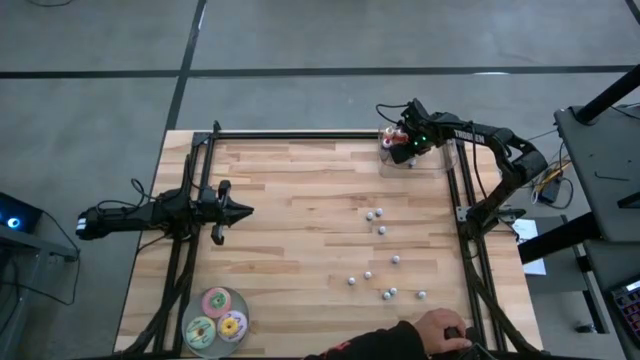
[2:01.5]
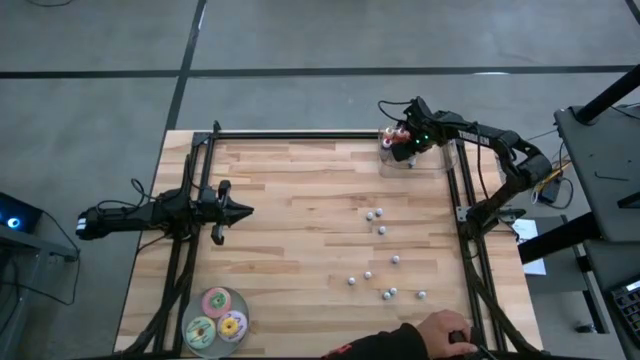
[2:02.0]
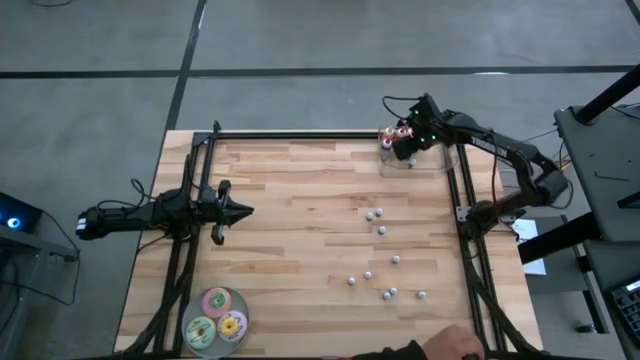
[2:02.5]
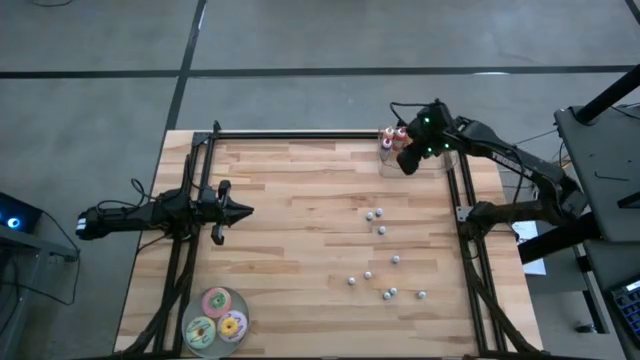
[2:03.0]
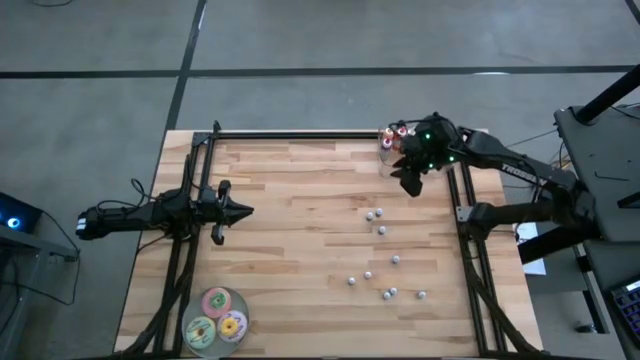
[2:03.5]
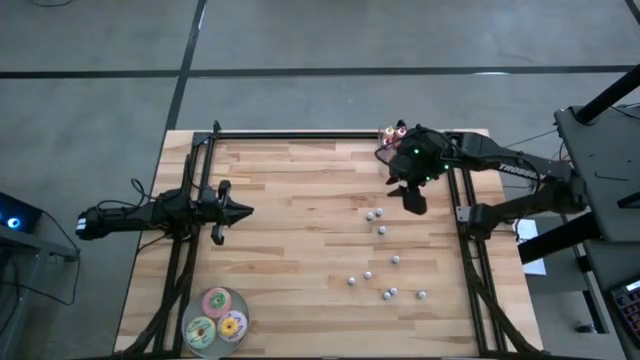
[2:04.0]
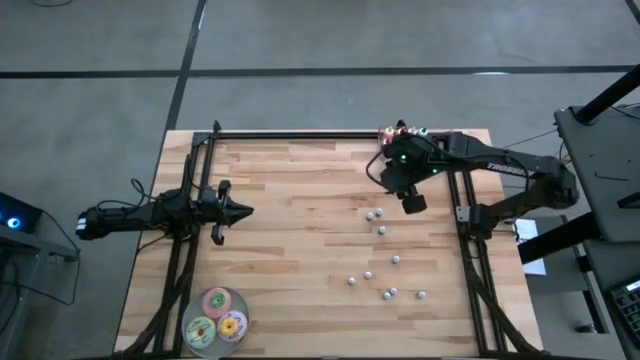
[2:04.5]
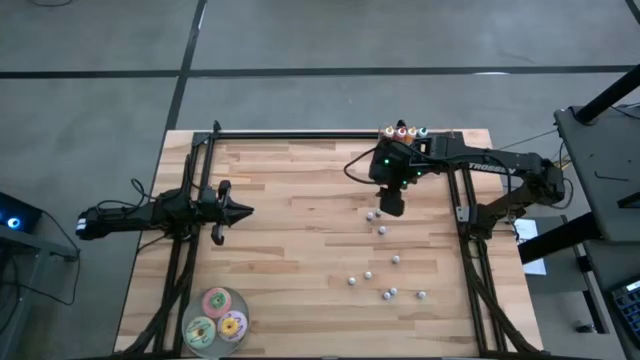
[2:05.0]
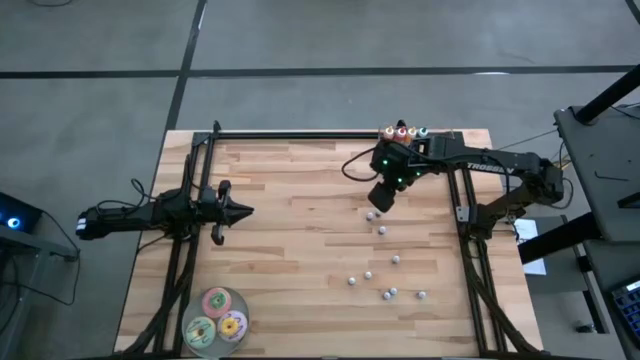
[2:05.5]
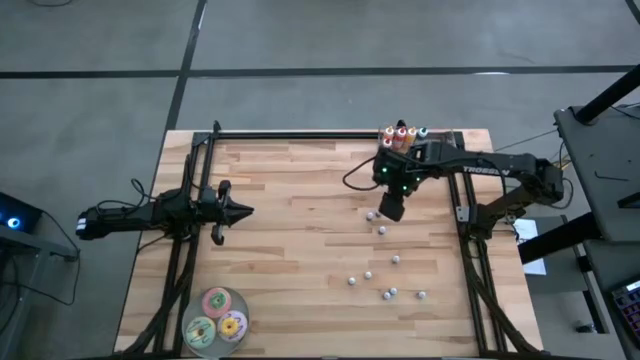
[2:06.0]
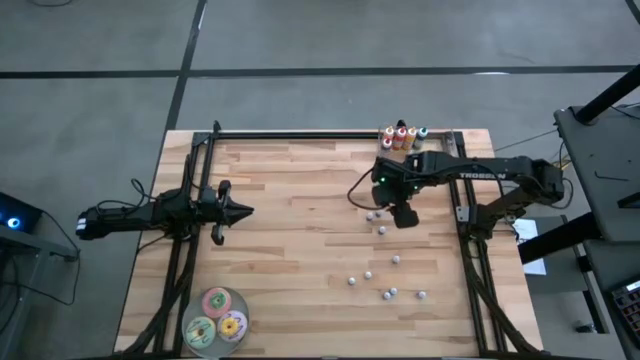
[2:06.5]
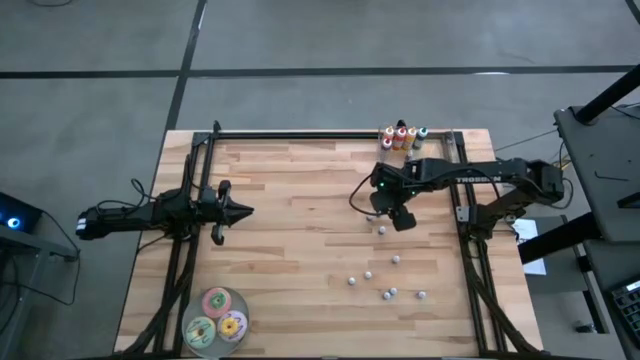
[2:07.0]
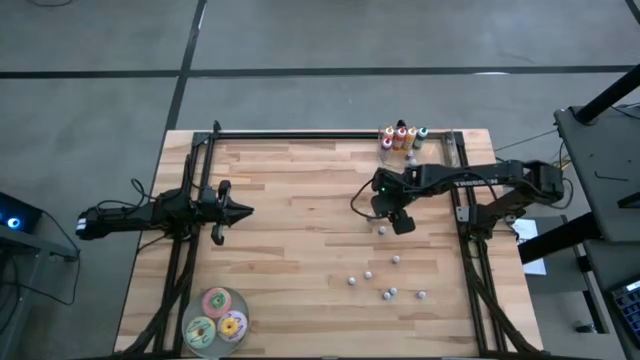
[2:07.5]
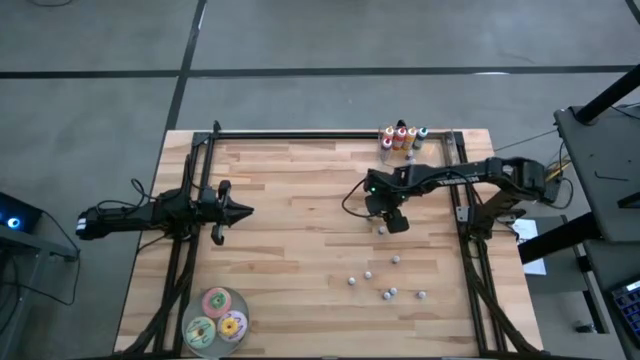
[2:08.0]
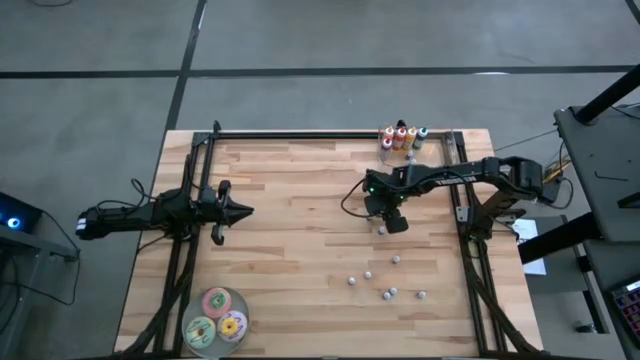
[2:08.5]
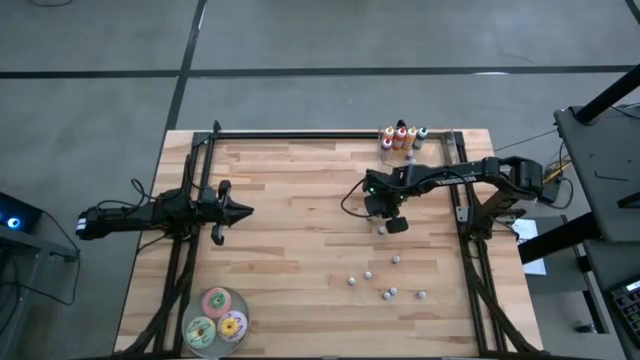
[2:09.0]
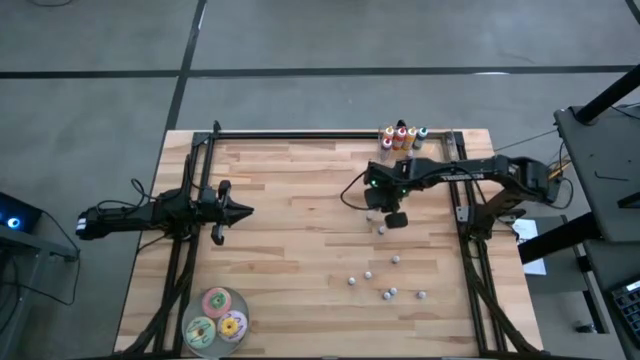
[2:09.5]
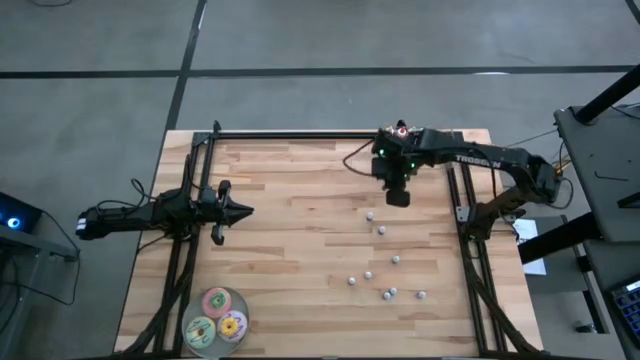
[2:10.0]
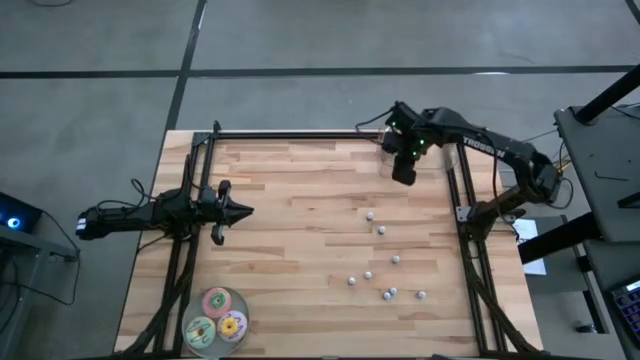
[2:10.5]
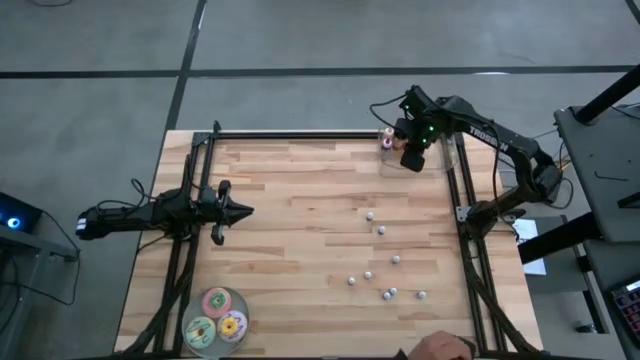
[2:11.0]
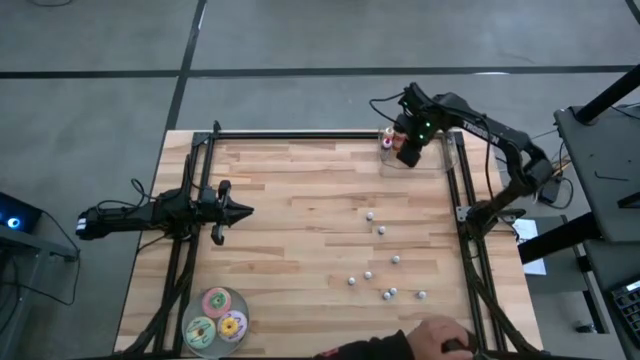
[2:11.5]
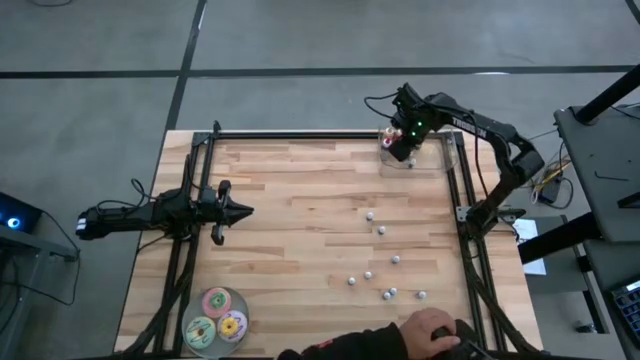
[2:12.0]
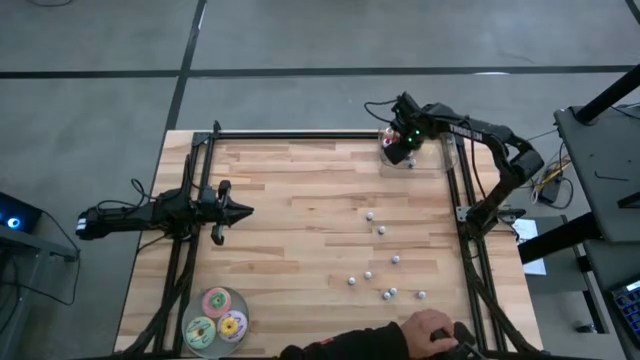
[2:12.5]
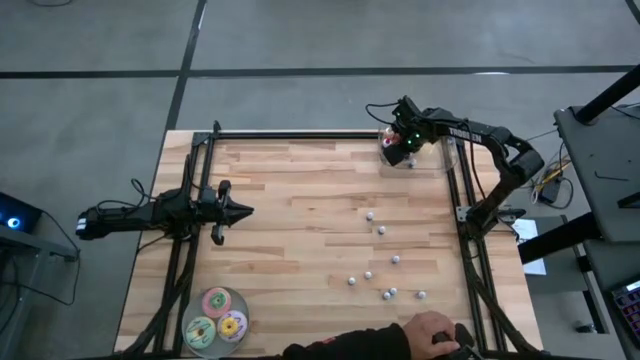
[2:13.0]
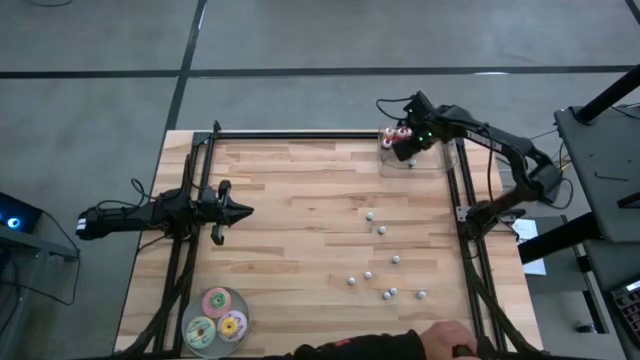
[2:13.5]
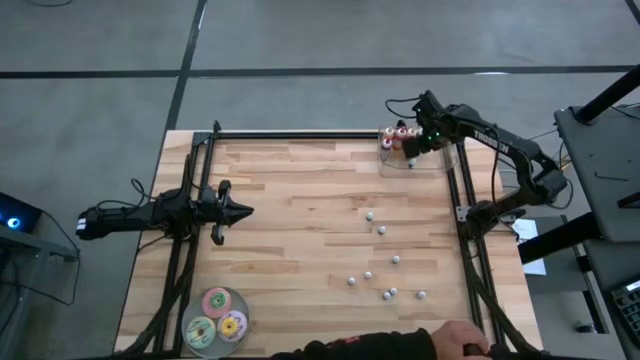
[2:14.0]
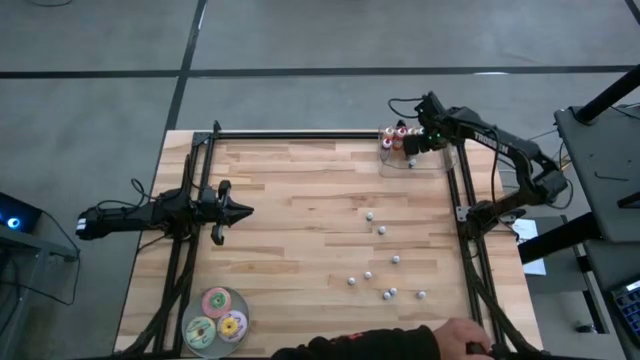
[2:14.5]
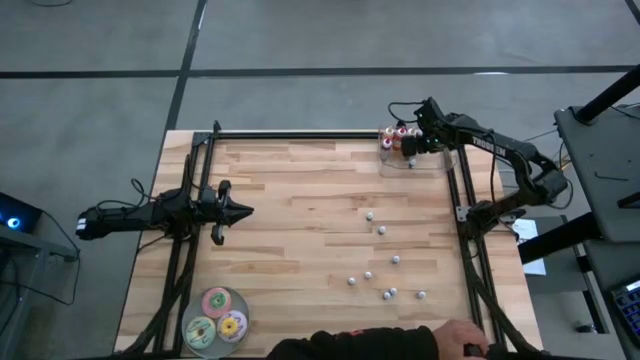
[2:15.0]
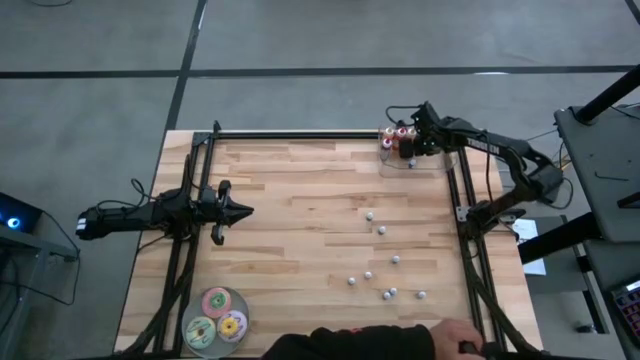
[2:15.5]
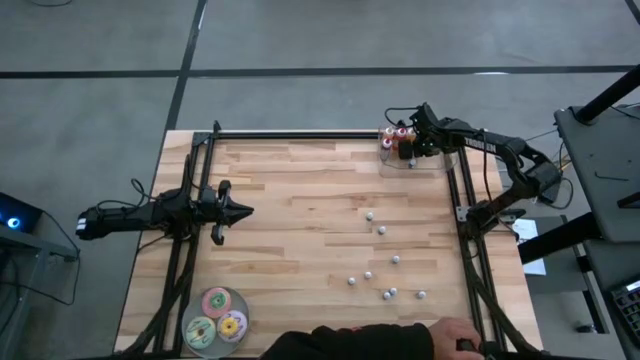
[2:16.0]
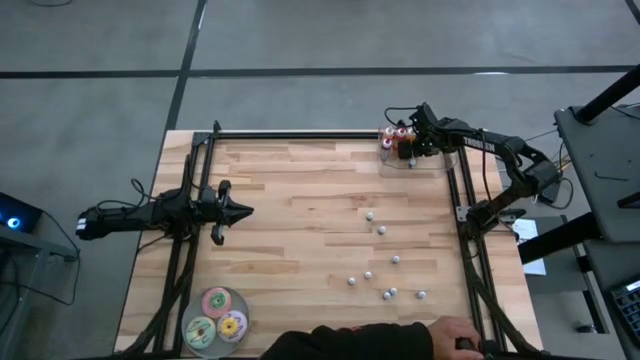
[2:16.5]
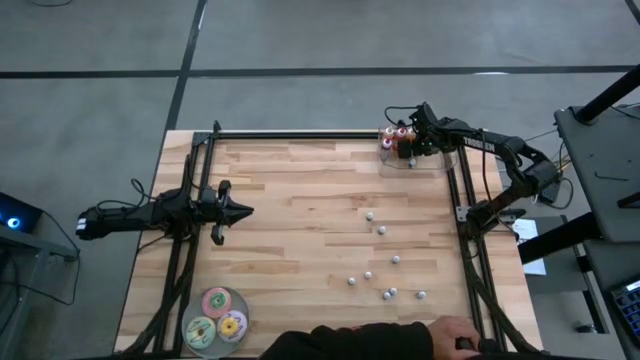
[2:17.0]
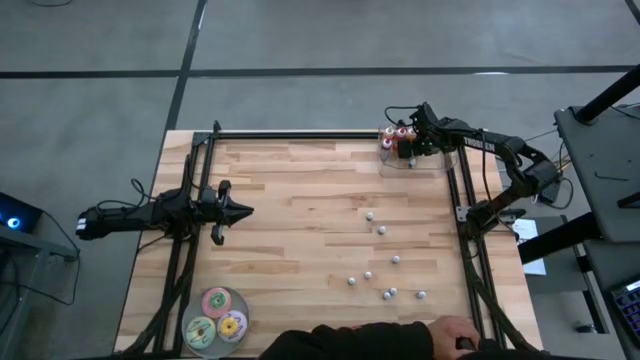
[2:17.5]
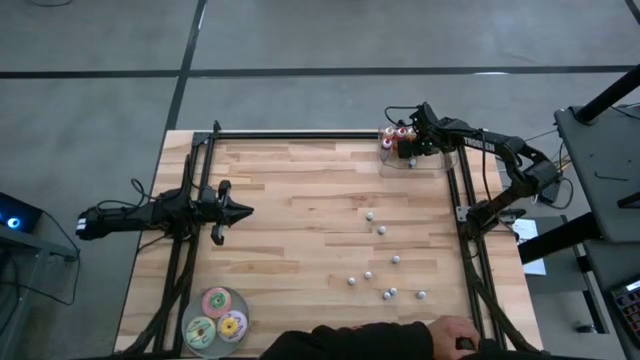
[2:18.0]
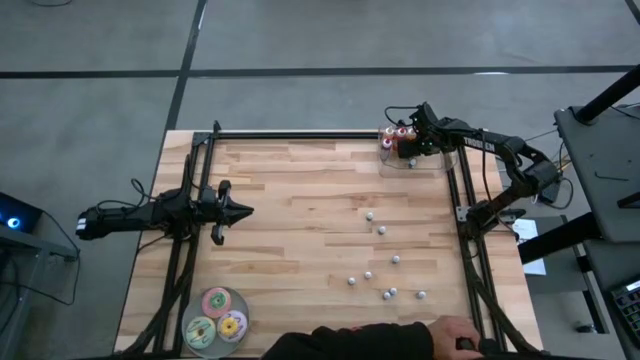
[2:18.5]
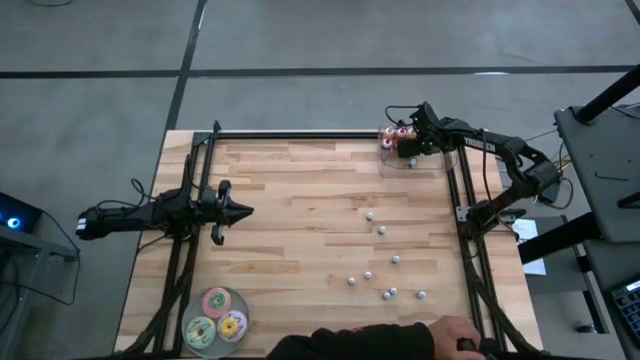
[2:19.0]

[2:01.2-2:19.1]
Task: Pick & Place food coloring
Put the small blue food coloring bottle into the bin

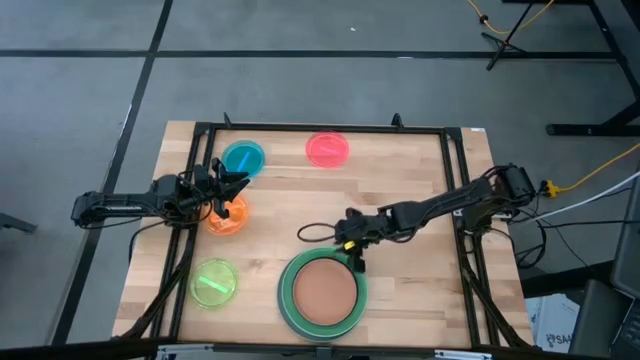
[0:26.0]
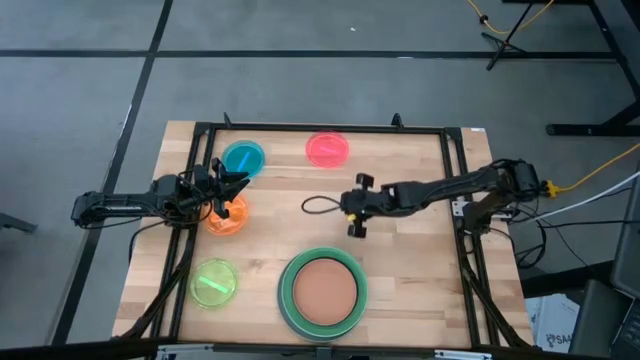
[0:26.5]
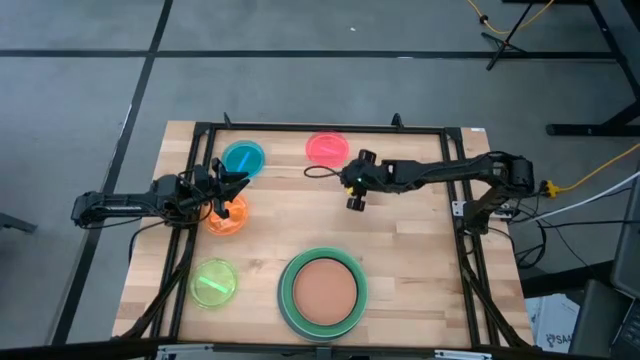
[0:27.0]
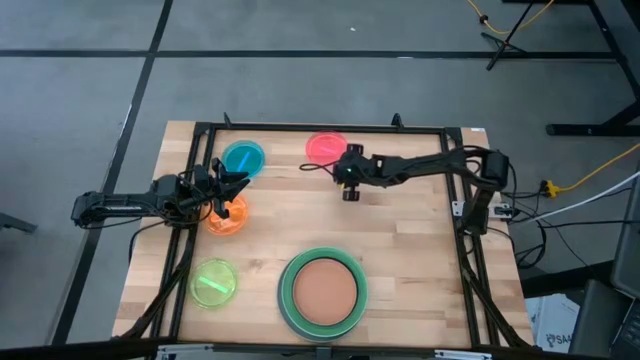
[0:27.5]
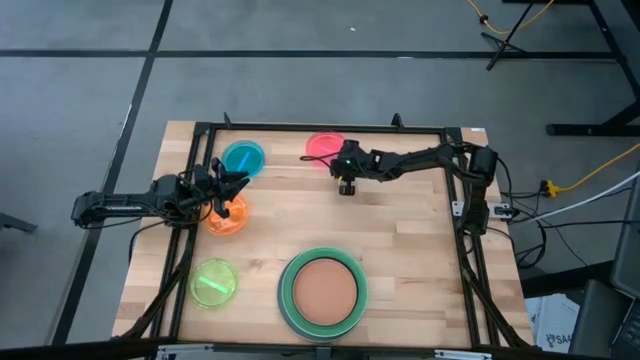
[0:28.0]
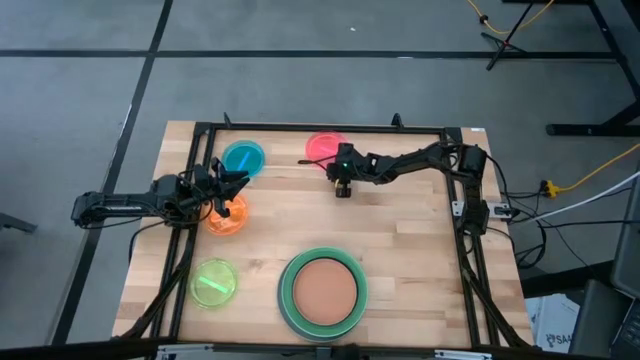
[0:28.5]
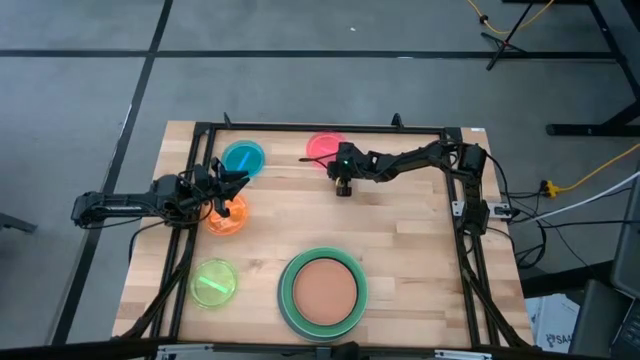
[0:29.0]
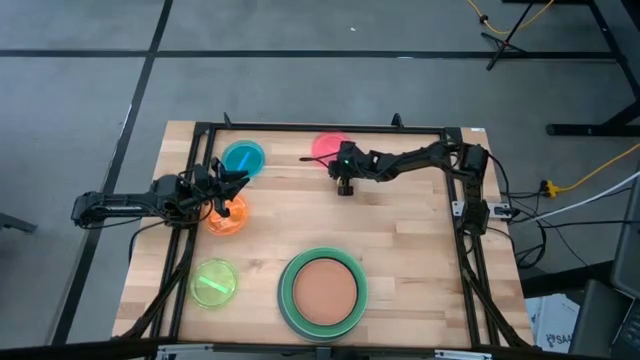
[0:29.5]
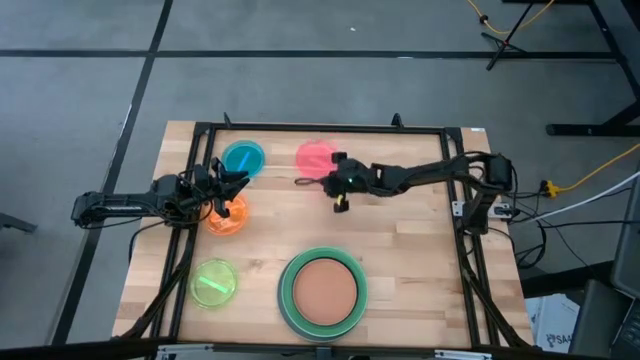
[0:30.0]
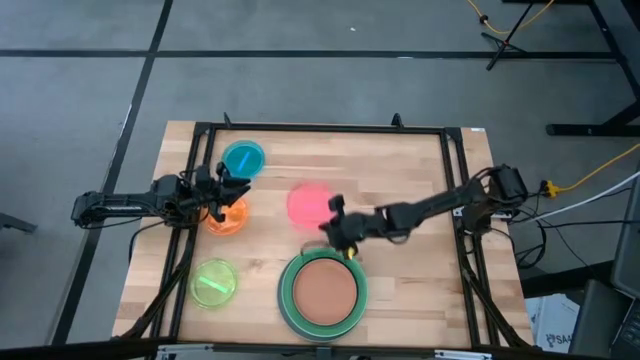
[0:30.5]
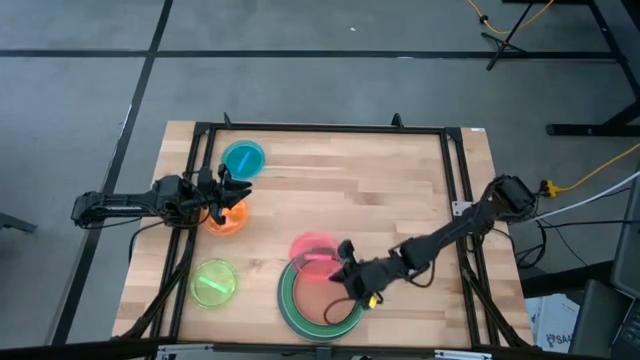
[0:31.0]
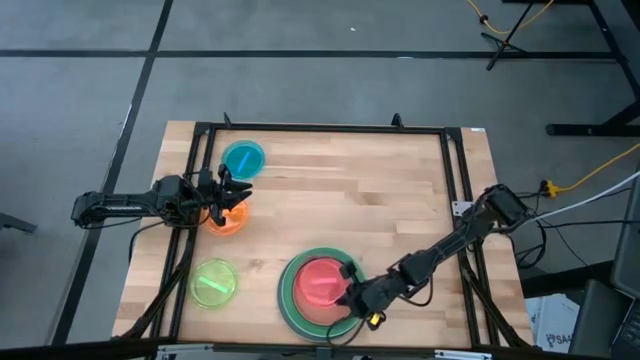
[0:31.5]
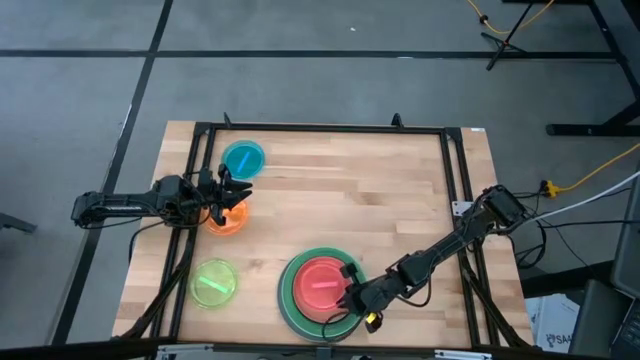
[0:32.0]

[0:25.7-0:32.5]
Task: Stack plastic plates
Stack the pink plate on top of the brown plate
